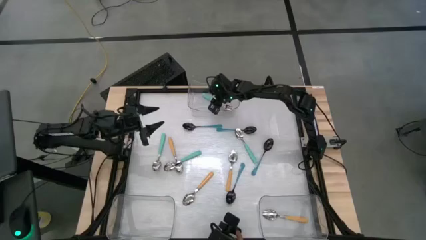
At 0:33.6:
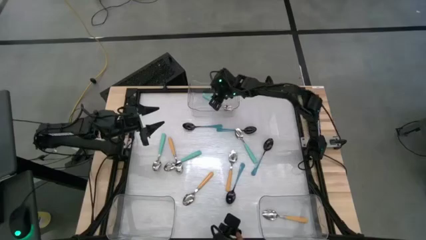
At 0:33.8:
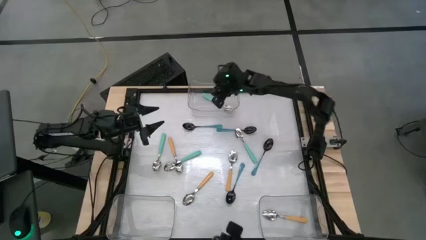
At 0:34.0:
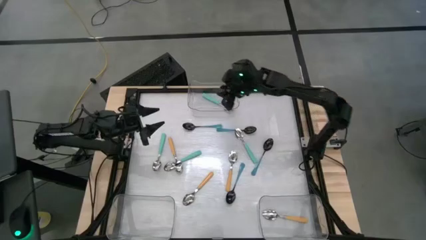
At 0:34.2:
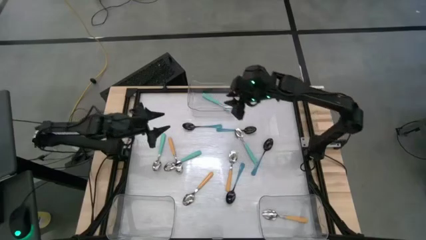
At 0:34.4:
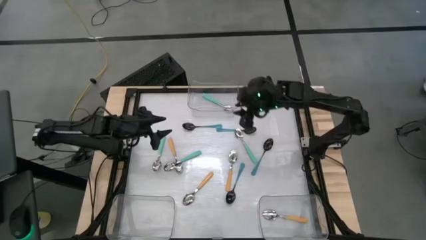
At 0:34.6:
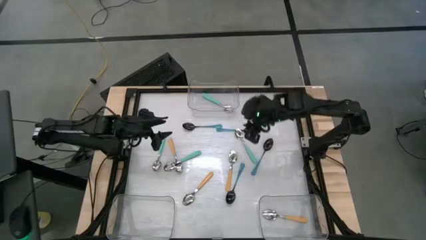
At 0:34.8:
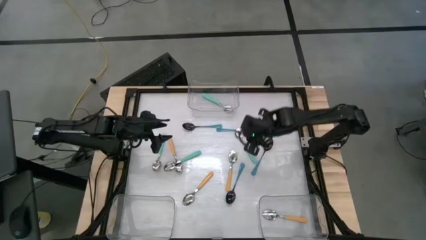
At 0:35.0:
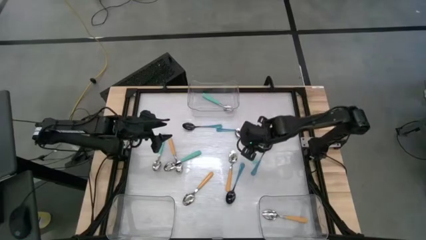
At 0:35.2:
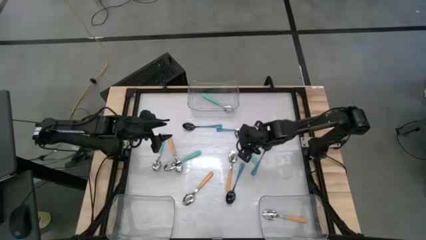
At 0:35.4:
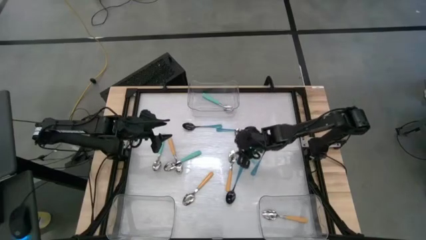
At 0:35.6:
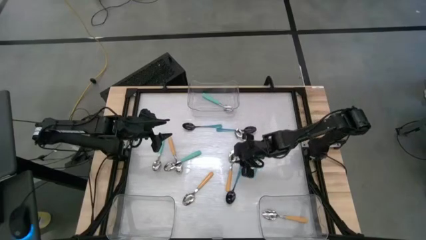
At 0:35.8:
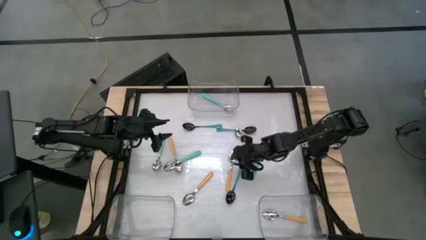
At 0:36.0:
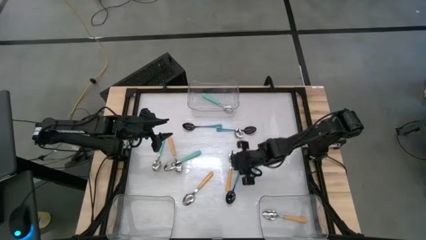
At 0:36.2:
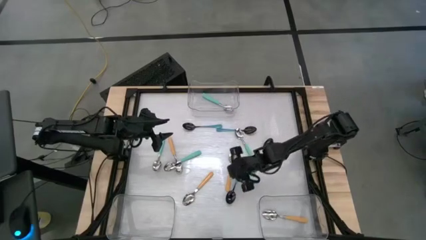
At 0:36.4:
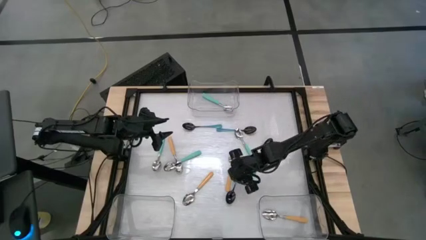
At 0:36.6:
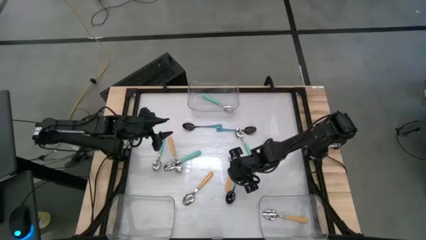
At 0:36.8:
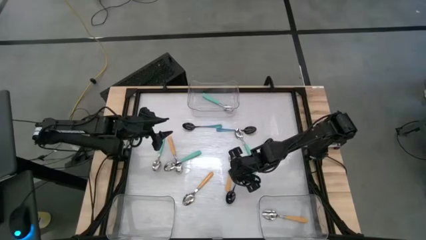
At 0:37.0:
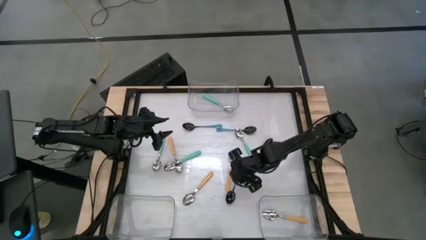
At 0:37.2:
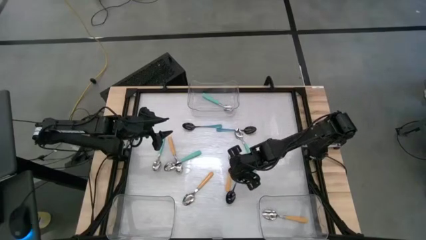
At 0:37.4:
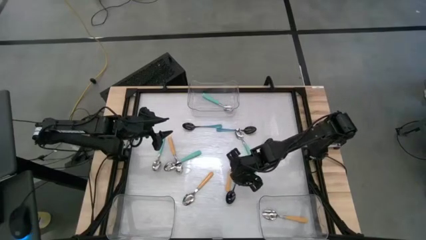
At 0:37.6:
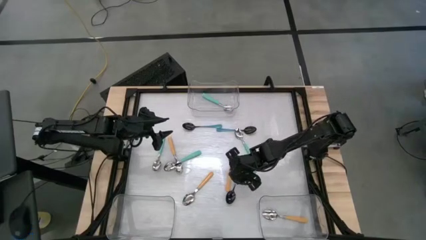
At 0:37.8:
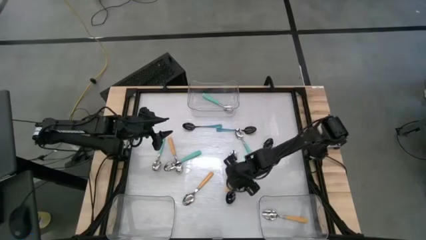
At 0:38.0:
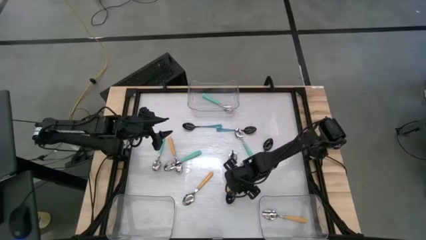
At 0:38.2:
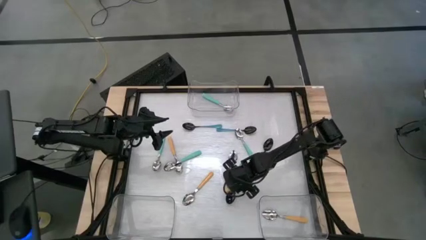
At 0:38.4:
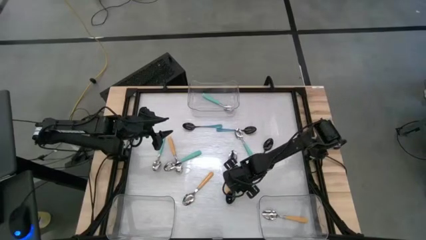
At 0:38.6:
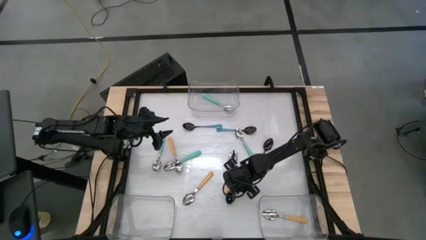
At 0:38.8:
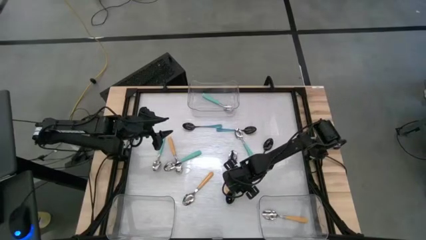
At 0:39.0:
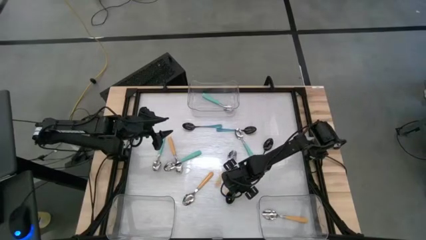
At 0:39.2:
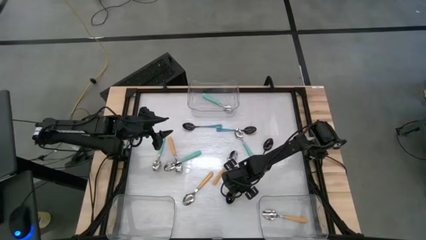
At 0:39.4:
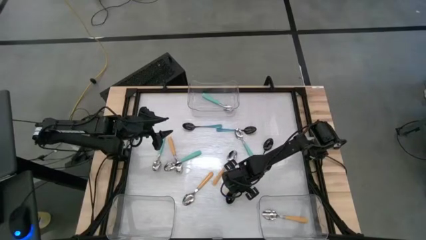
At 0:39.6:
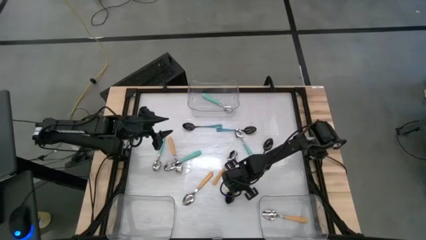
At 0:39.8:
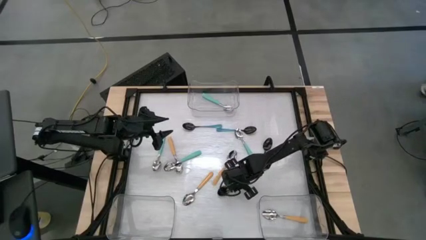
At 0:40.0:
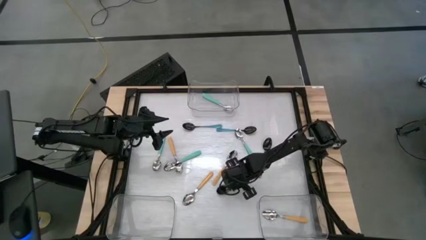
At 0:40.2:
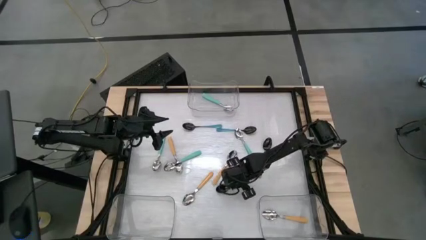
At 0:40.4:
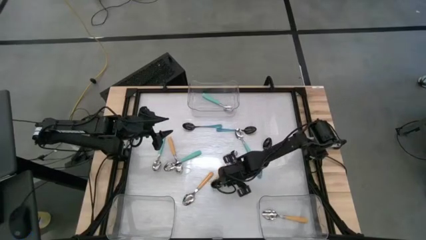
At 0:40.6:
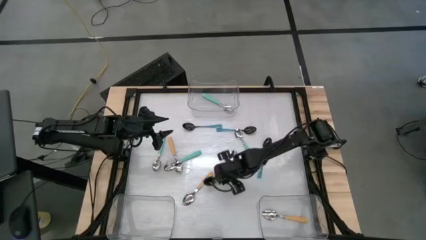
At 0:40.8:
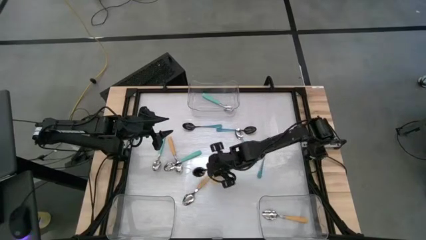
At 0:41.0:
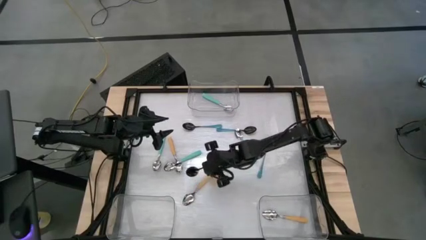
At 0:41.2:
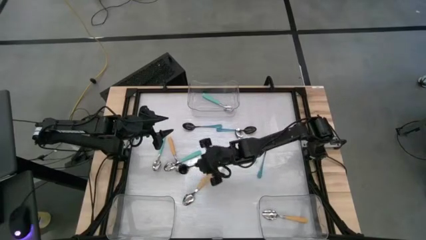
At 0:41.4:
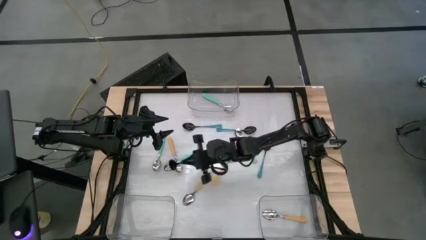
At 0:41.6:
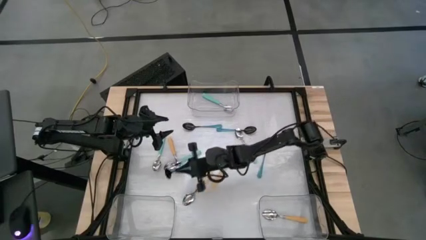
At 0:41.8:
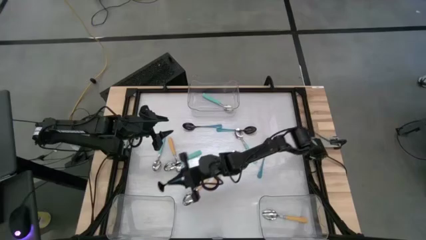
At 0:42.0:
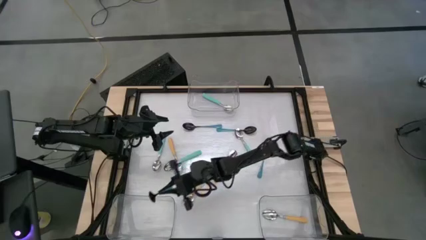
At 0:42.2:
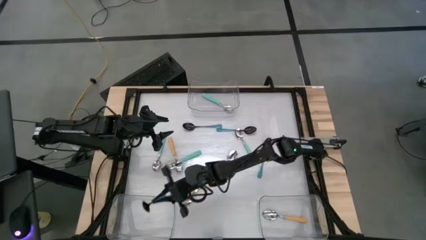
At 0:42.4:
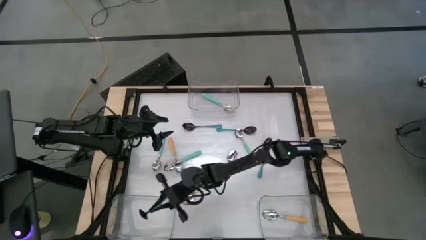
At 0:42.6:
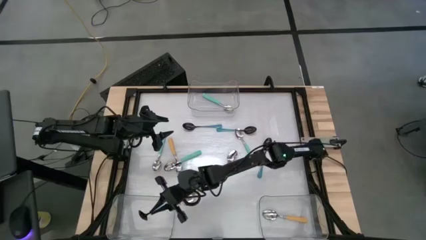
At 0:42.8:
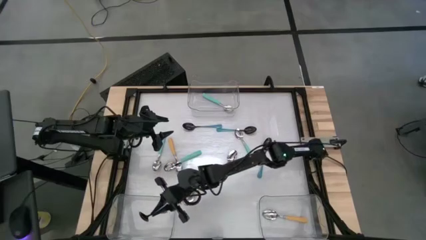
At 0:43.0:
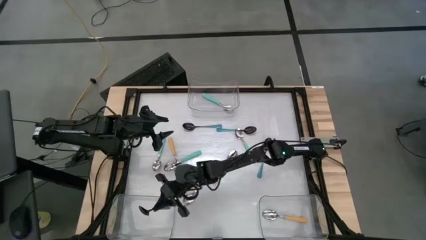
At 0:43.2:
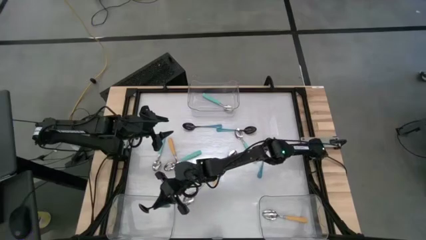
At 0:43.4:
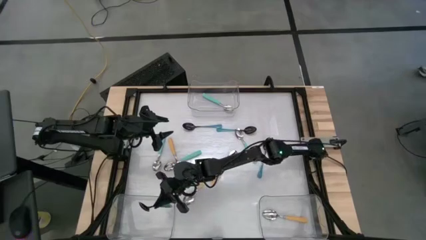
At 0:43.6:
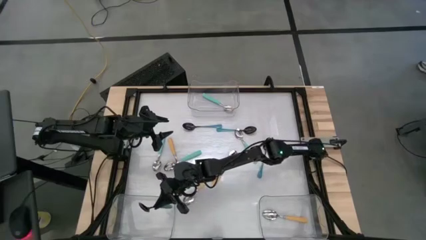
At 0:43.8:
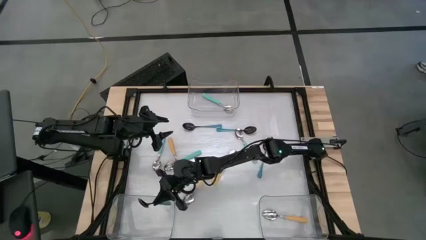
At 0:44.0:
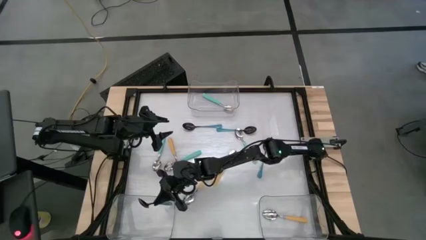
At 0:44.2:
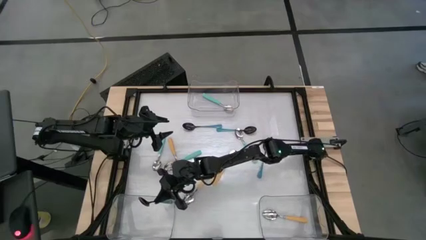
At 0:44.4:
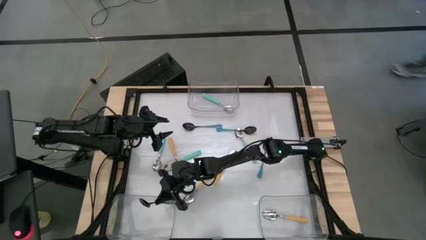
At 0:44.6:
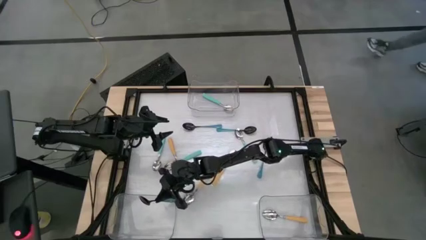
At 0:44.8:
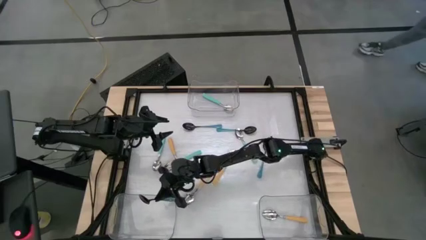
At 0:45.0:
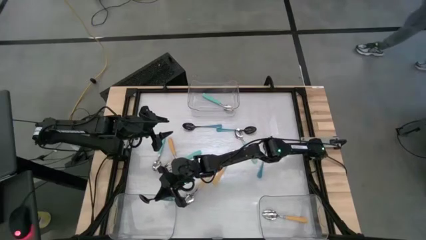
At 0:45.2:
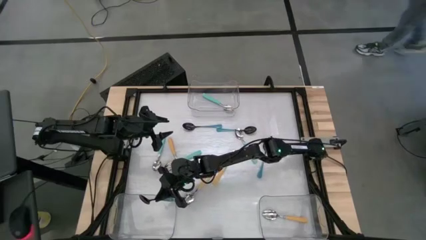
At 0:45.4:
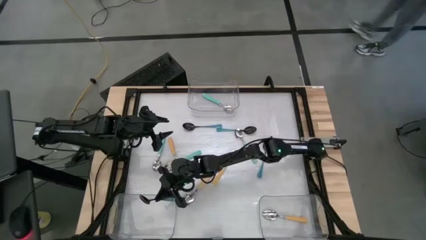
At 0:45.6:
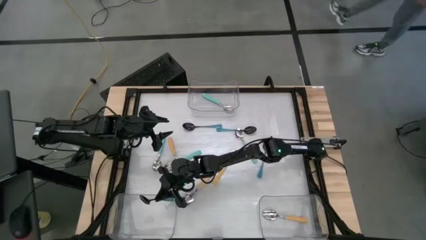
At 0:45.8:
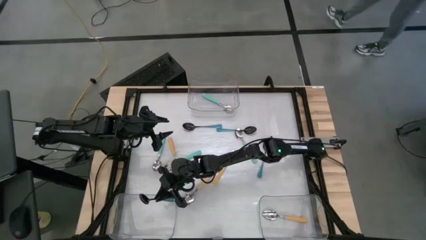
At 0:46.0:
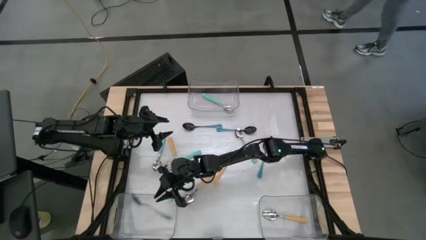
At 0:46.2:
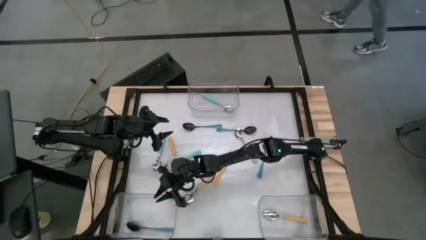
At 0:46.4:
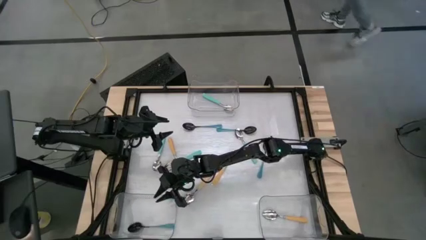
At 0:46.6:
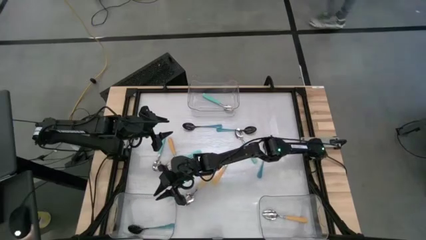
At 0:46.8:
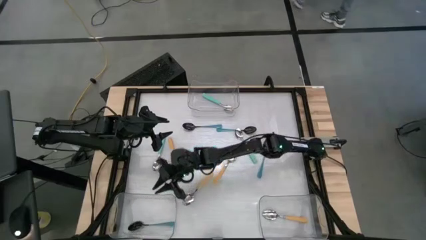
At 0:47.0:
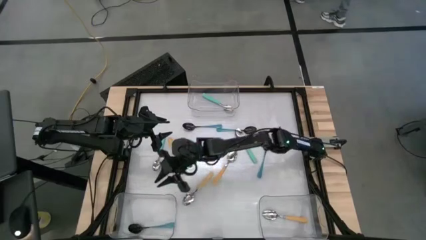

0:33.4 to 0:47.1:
Task: Sort silverware by color (type)
Put the bottom black spoon into the bottom left transparent bin
